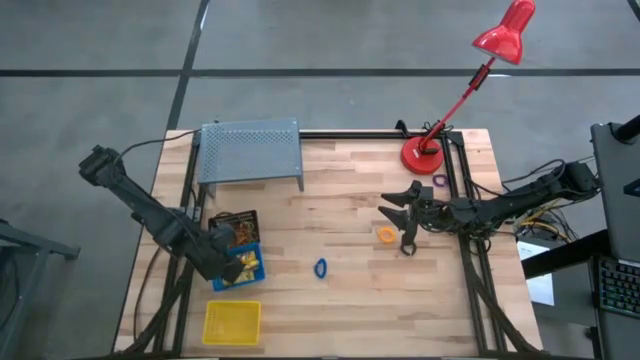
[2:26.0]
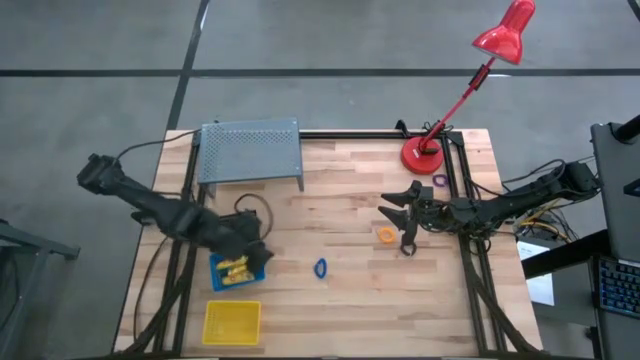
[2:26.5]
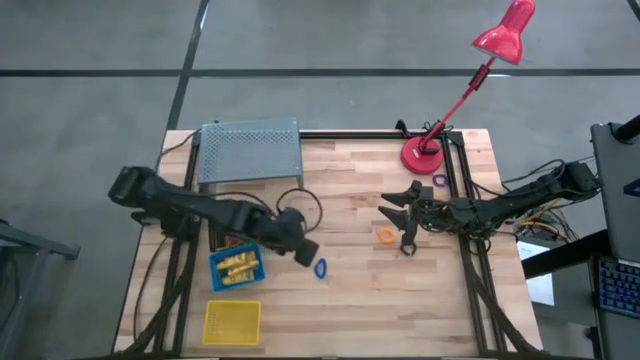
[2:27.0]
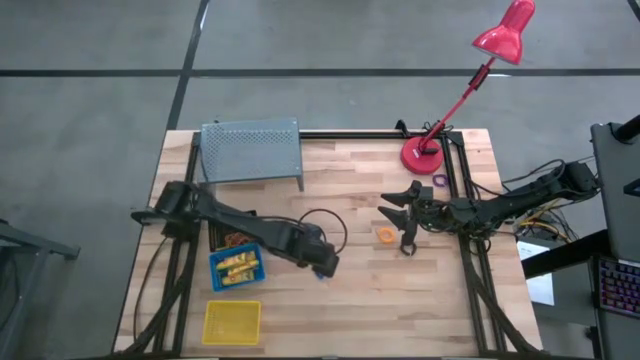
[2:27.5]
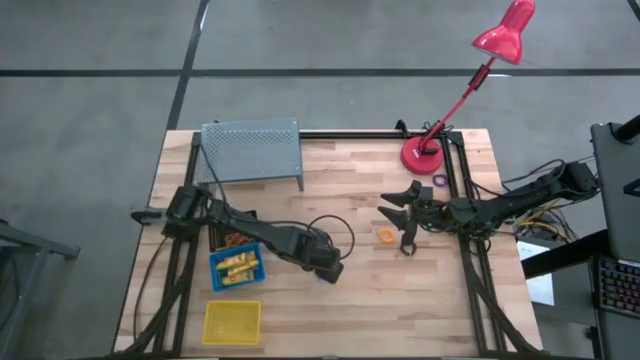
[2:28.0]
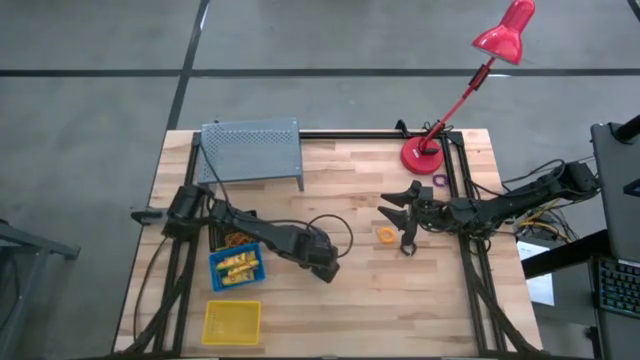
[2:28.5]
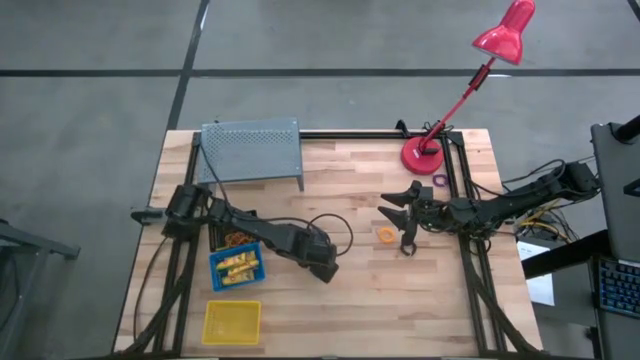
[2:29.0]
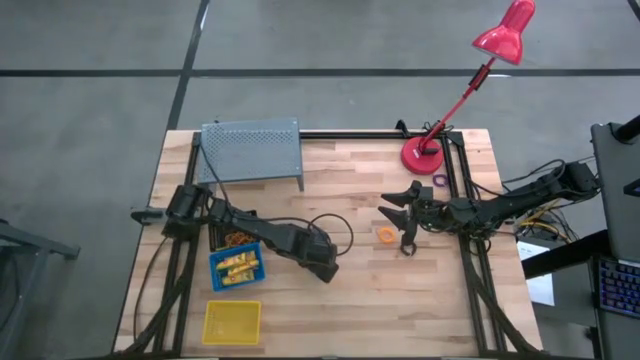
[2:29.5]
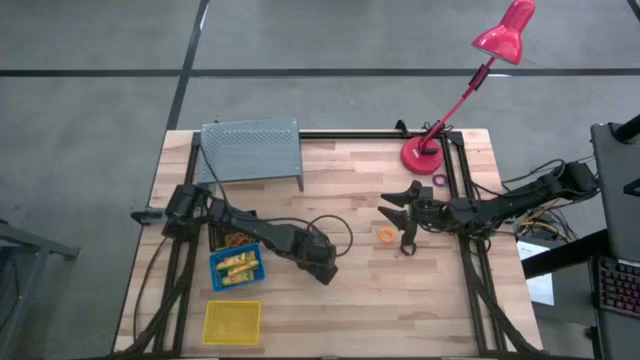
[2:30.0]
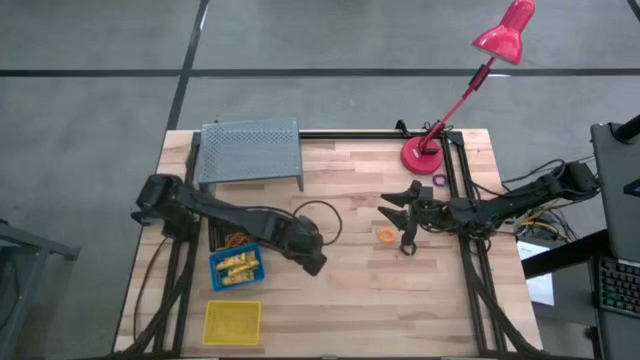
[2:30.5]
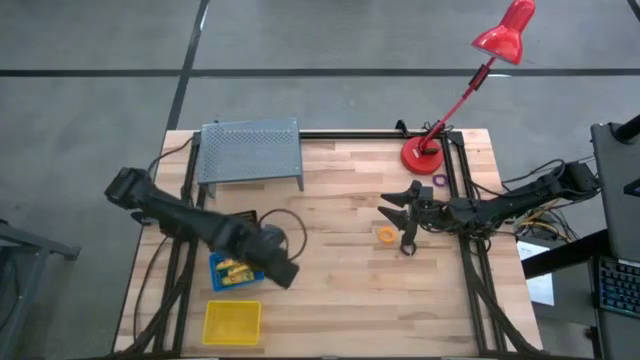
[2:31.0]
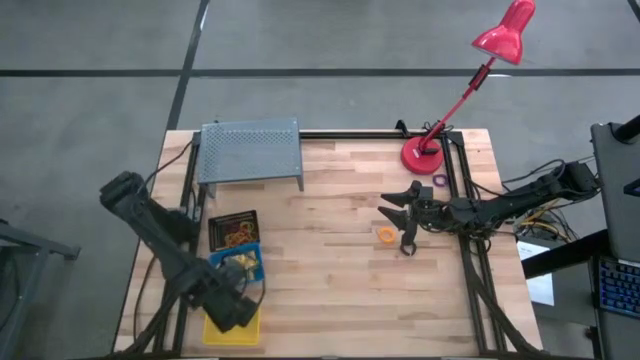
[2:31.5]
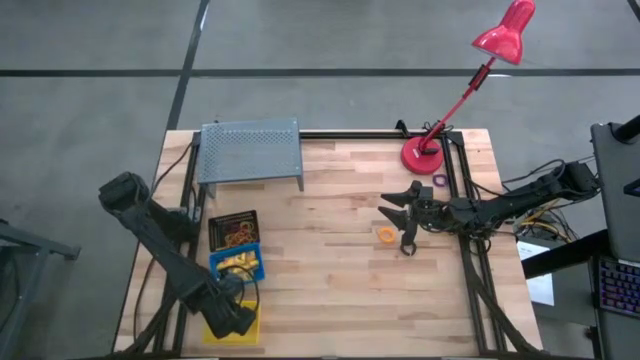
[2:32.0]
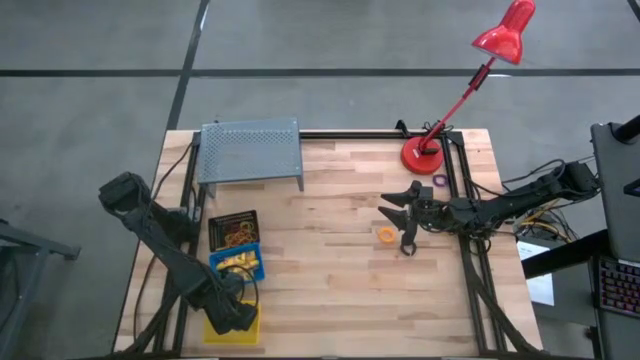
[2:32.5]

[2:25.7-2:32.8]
Task: Pick & Place Office Desk Supplies
Put the blue key chain in the yellow bin

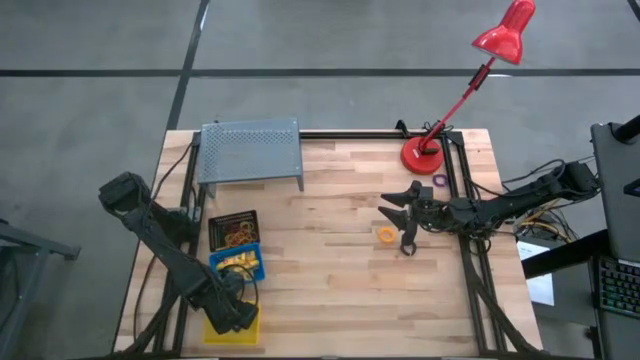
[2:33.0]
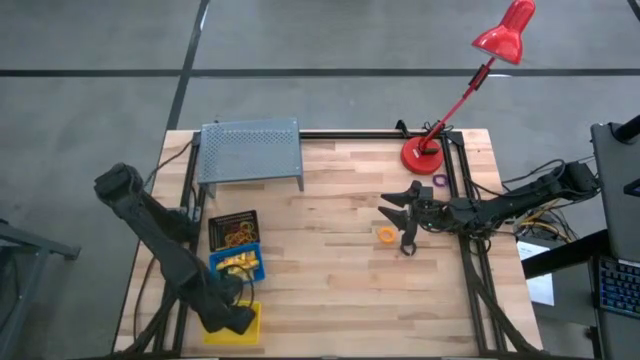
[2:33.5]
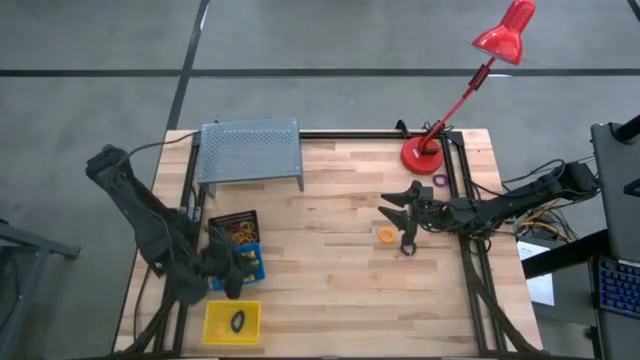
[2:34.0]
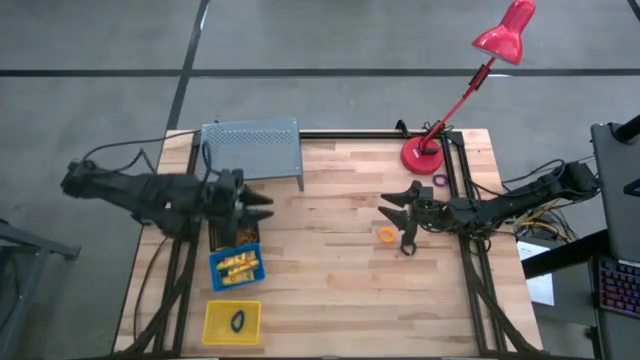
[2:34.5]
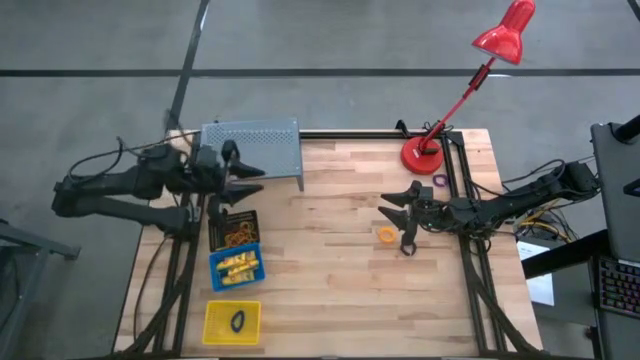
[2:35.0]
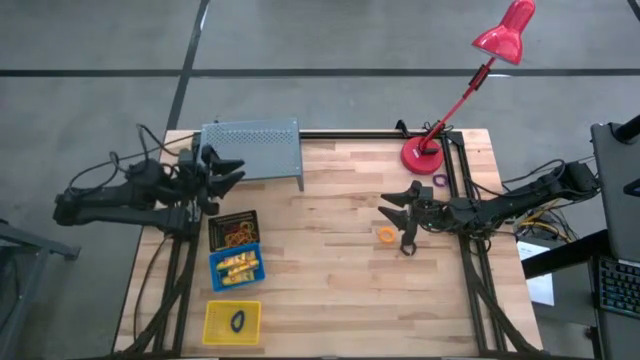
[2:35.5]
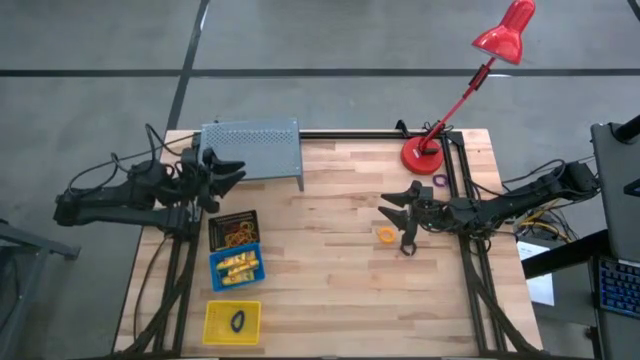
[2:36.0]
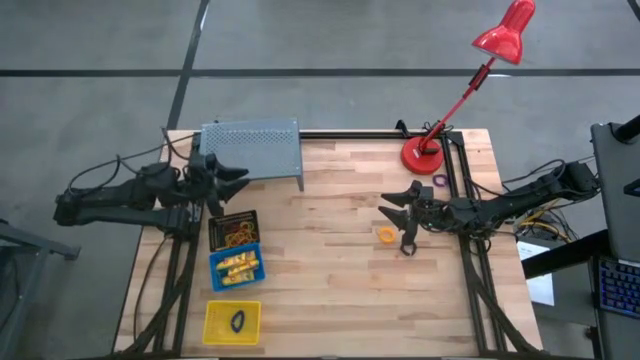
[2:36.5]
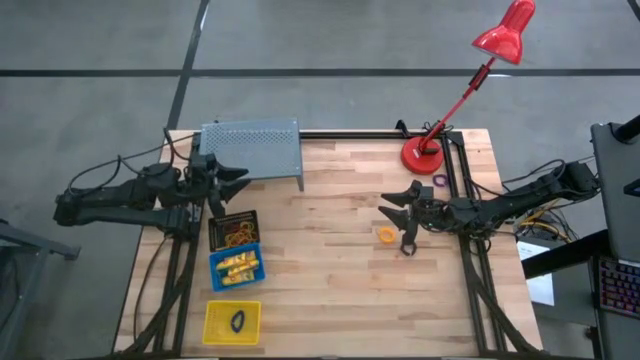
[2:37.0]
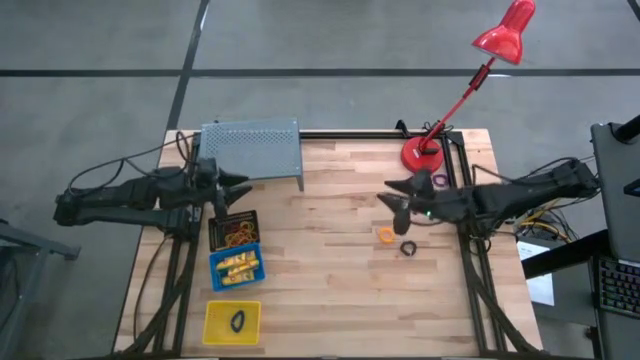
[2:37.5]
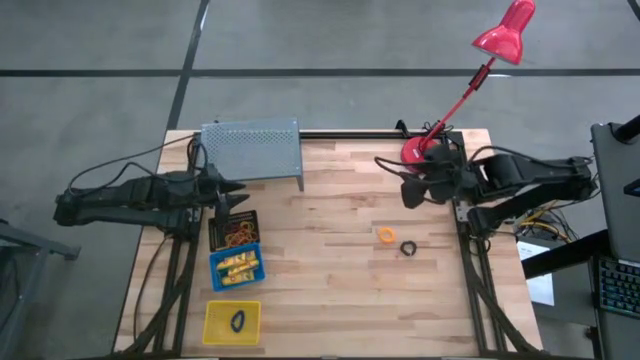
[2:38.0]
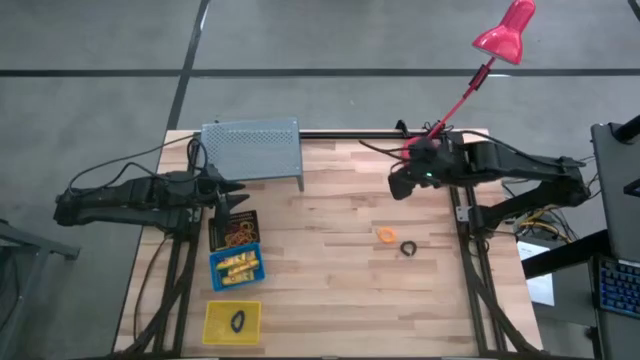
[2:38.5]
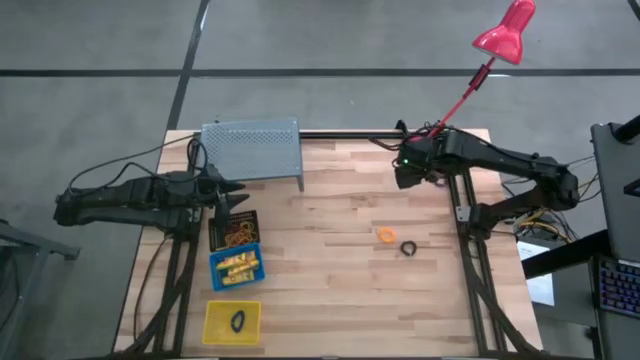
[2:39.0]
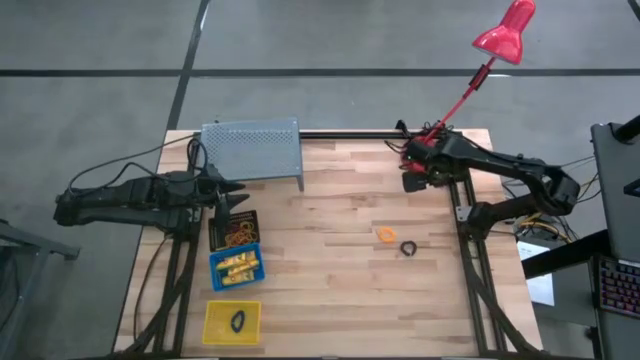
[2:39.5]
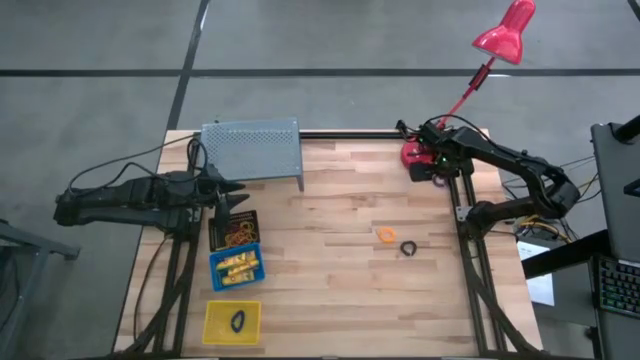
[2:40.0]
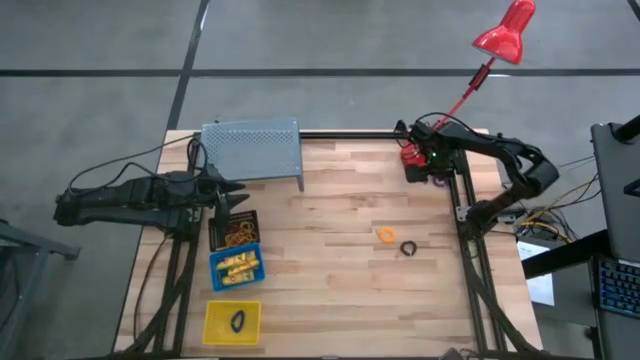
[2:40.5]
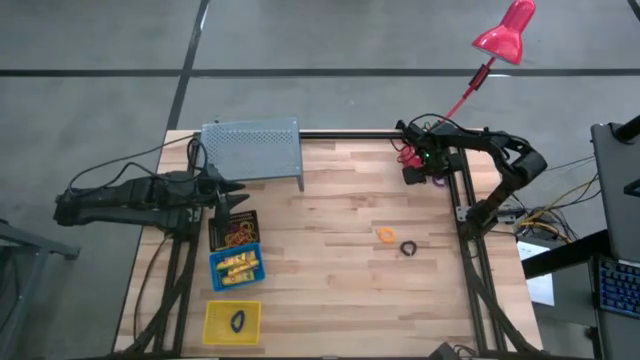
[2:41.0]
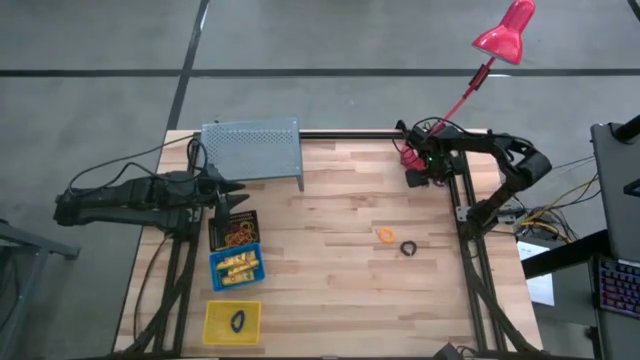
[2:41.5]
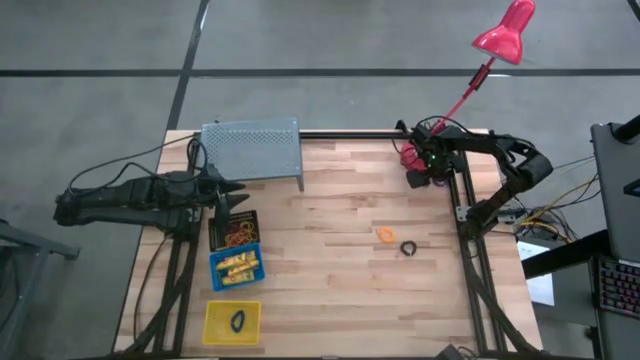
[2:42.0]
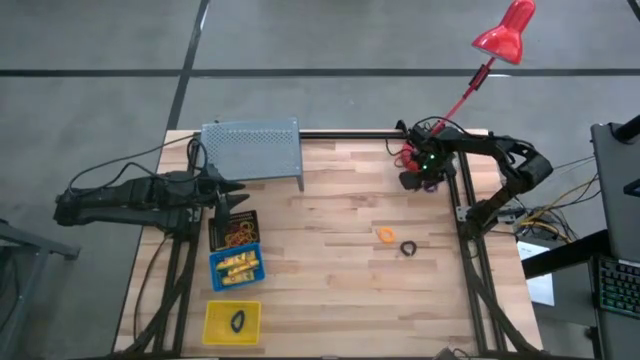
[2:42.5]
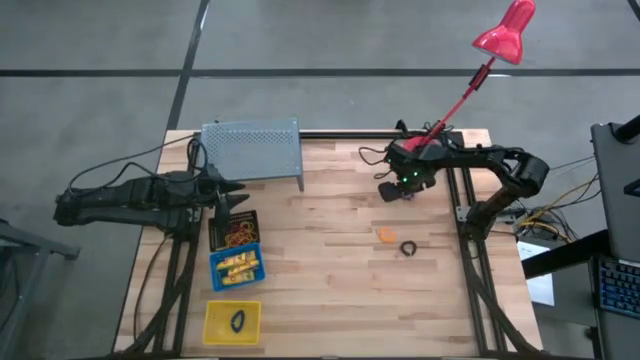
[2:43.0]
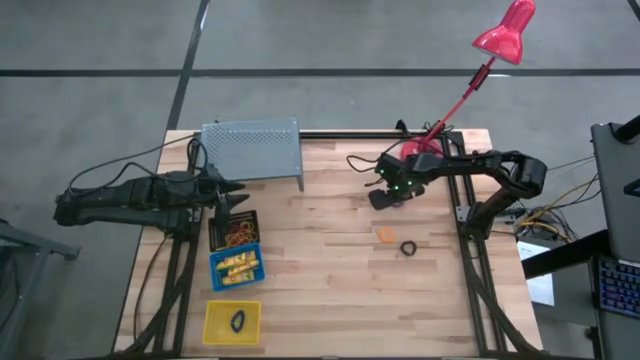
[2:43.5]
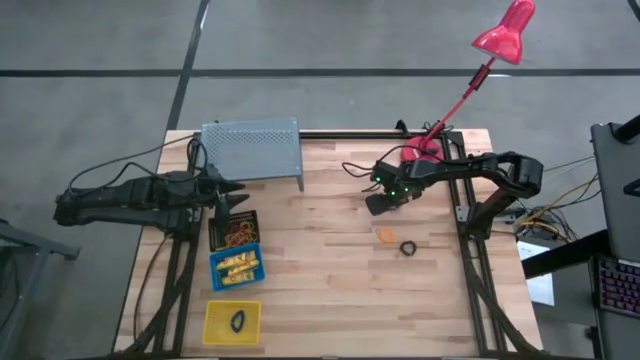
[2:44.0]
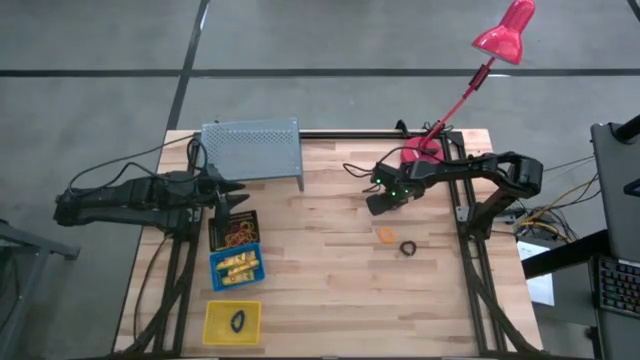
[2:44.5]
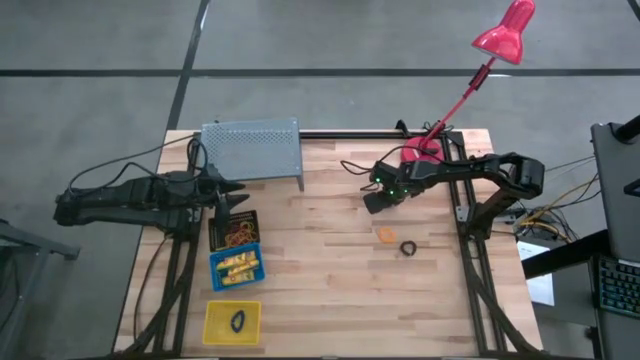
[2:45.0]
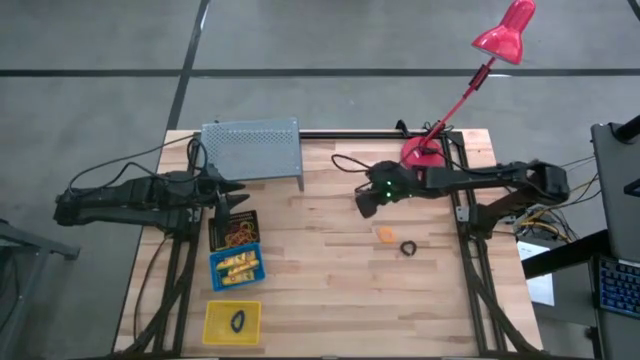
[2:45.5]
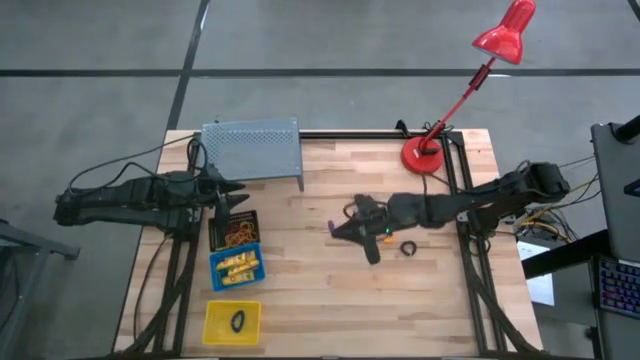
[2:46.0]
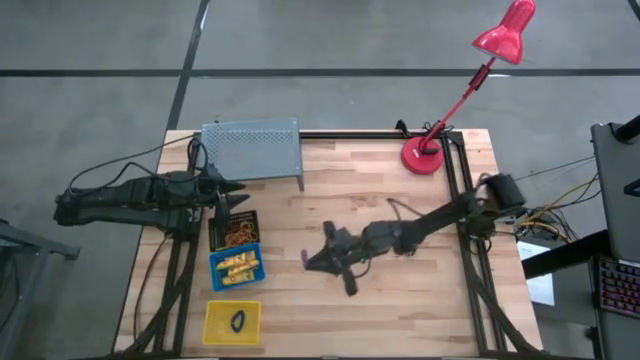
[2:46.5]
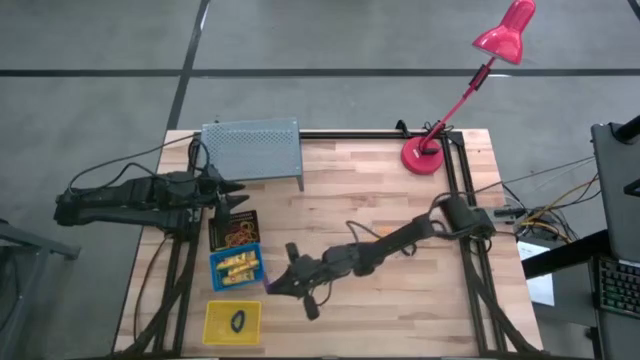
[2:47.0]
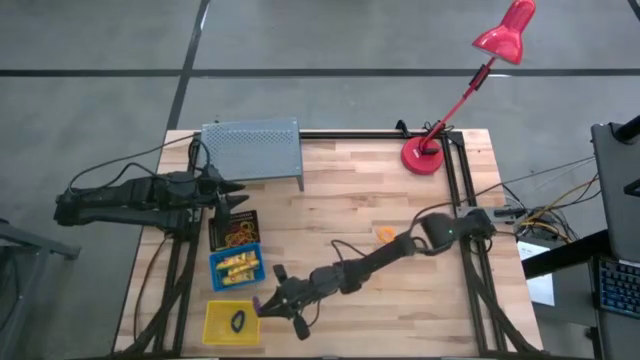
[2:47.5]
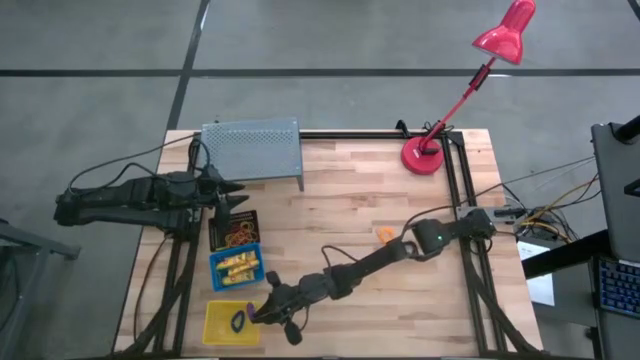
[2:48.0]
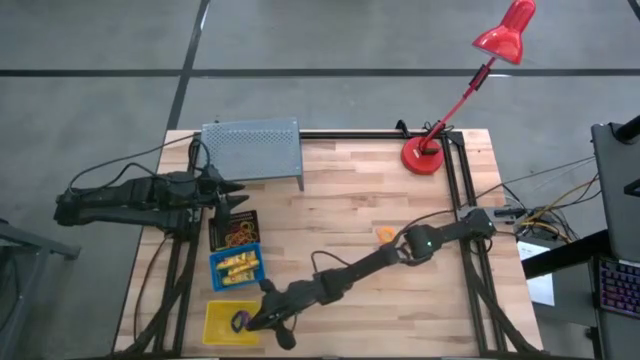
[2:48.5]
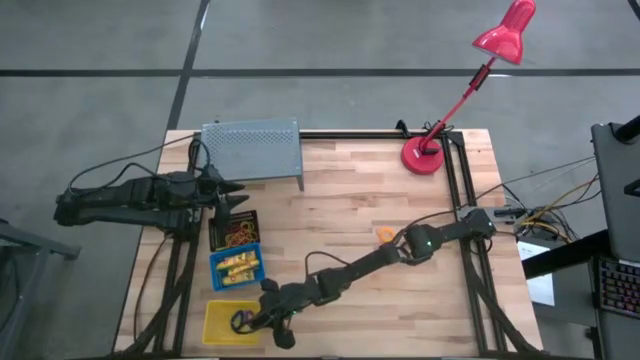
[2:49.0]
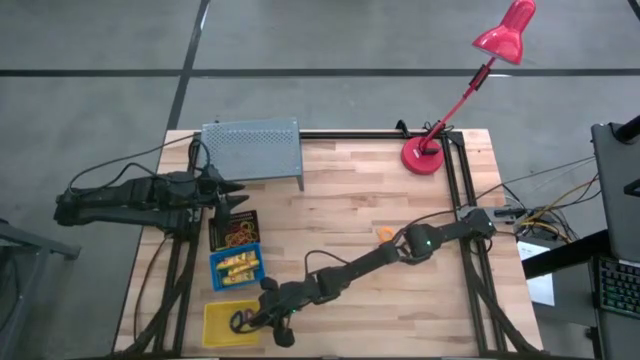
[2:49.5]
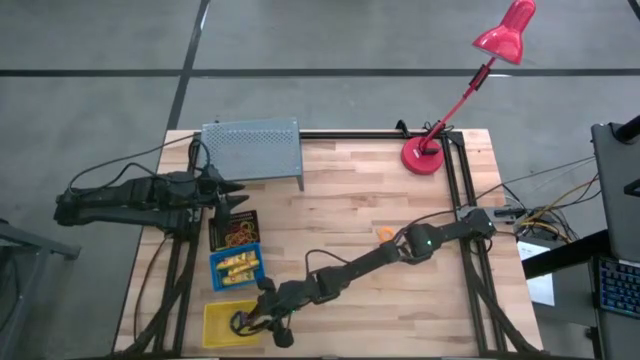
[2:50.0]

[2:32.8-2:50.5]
Put the purple key chain in the yellow bin
